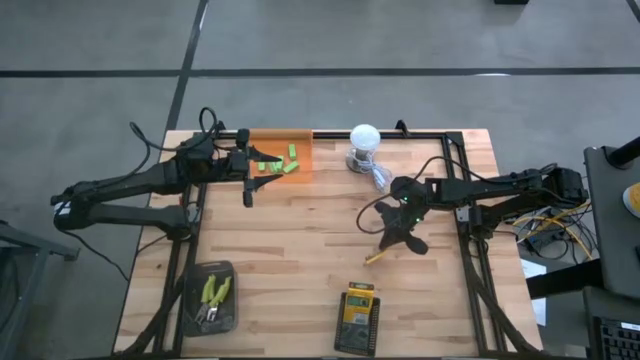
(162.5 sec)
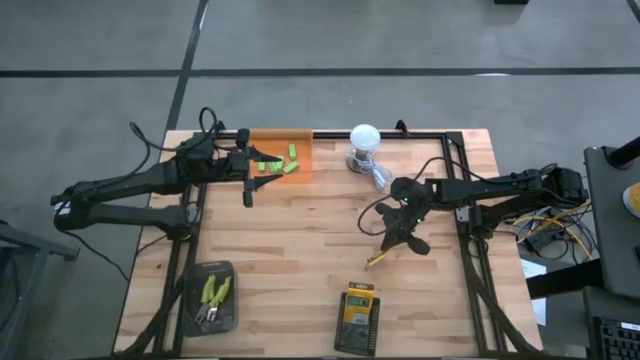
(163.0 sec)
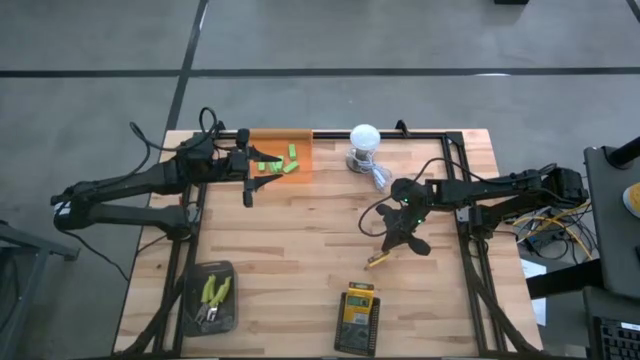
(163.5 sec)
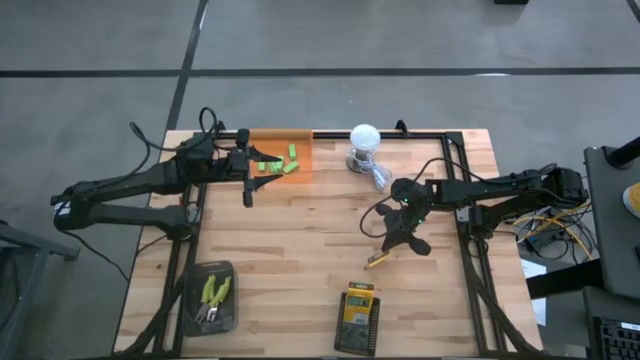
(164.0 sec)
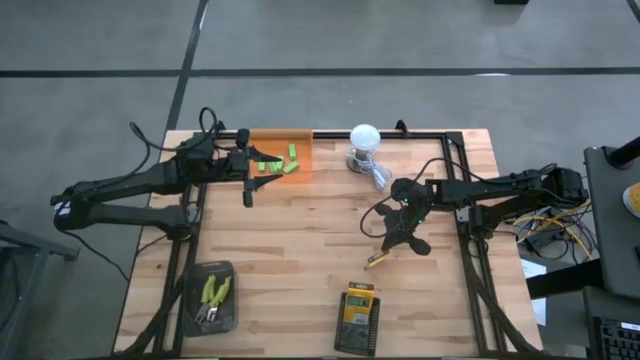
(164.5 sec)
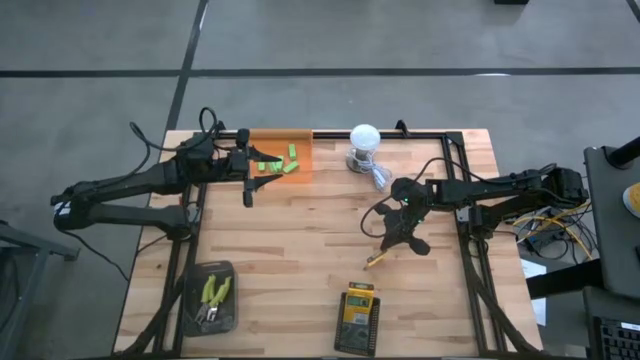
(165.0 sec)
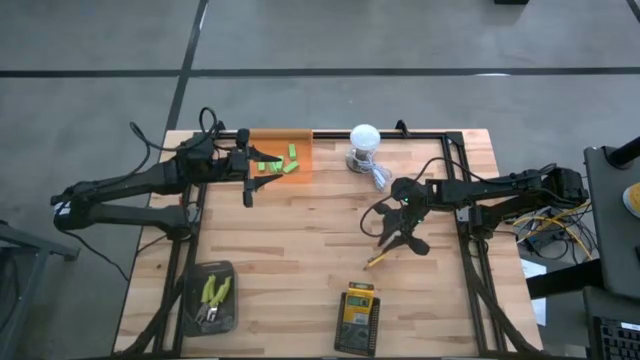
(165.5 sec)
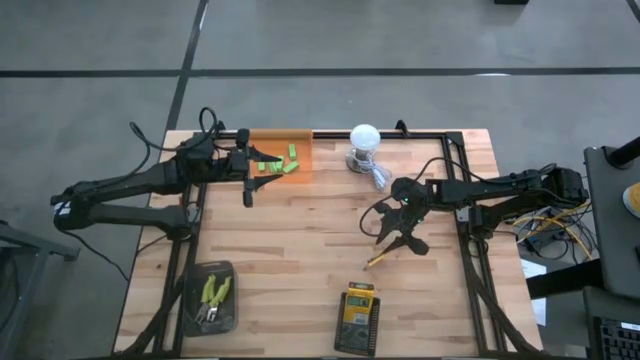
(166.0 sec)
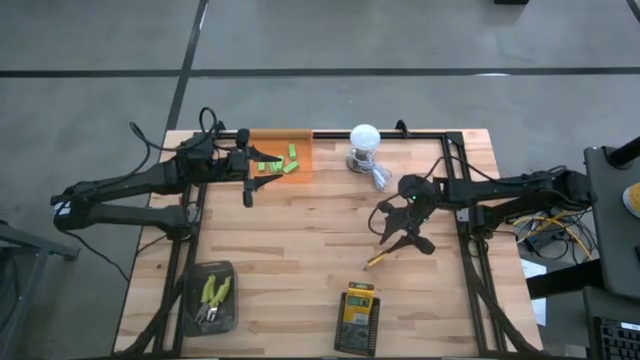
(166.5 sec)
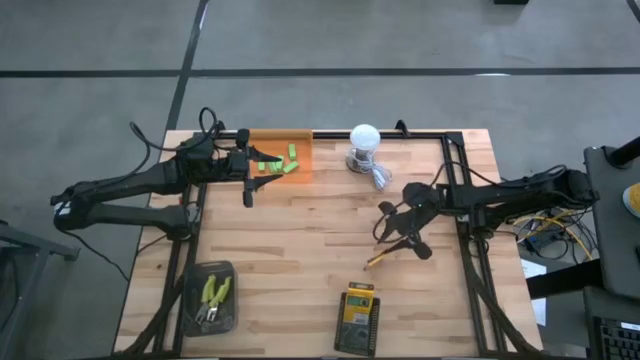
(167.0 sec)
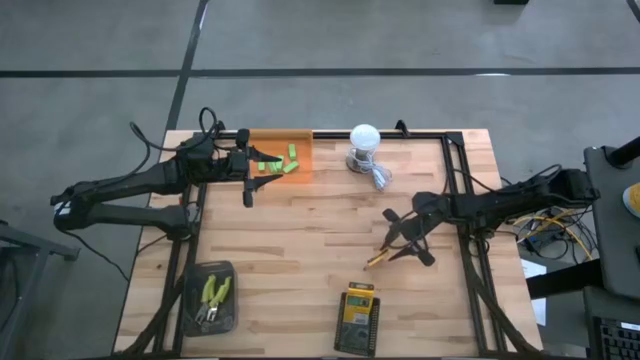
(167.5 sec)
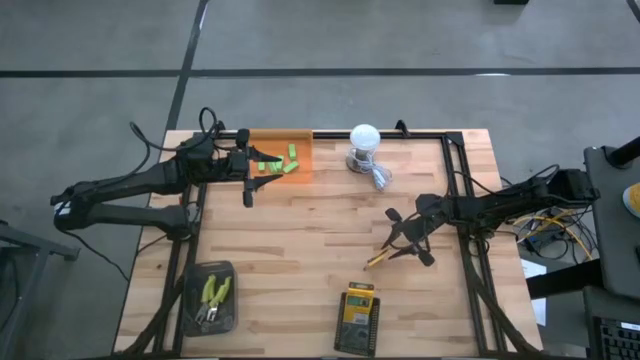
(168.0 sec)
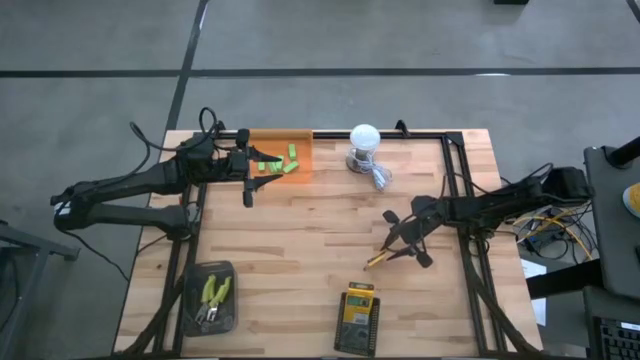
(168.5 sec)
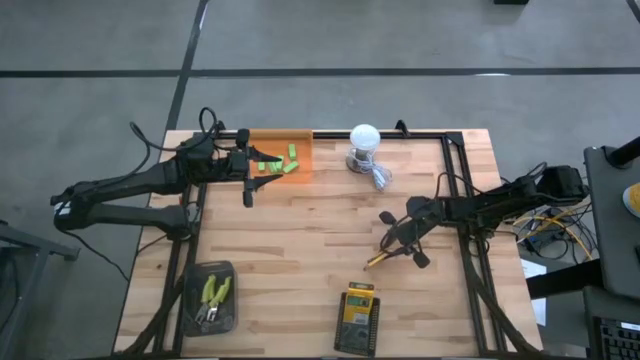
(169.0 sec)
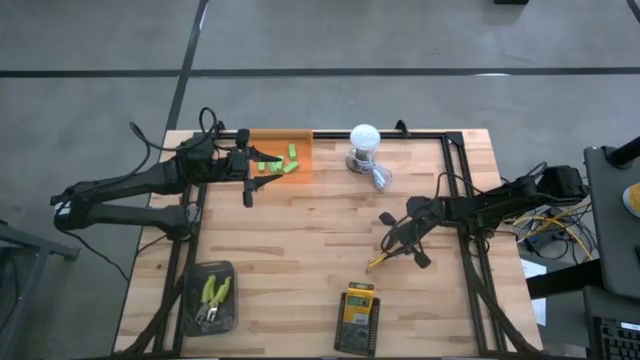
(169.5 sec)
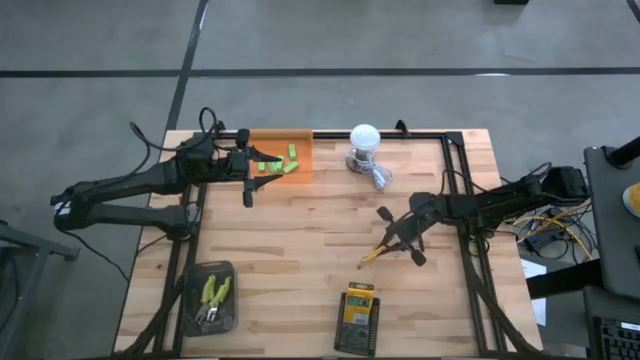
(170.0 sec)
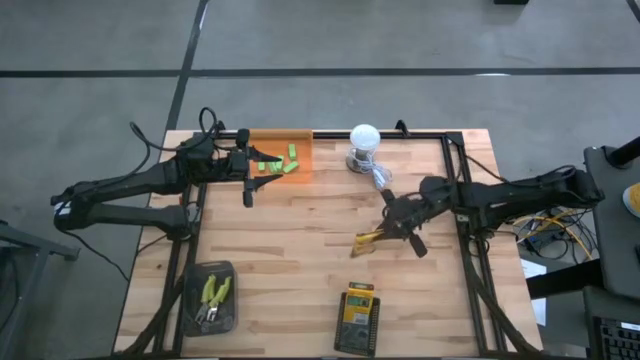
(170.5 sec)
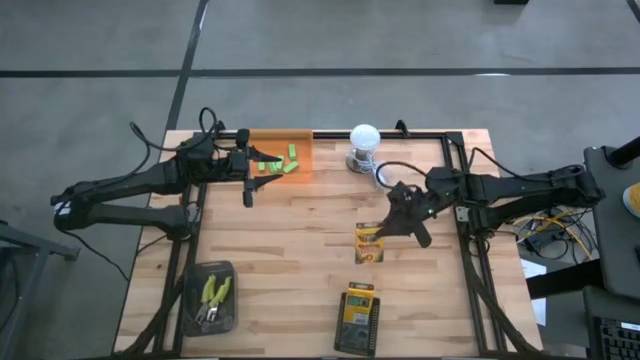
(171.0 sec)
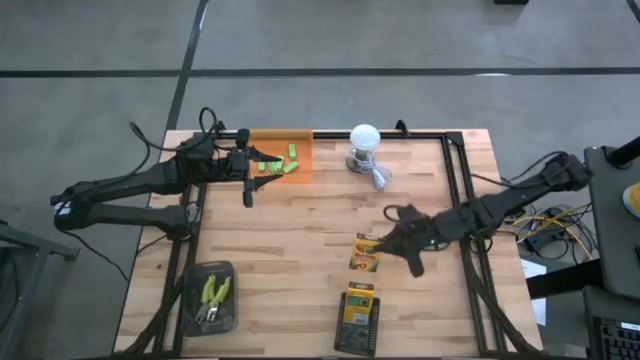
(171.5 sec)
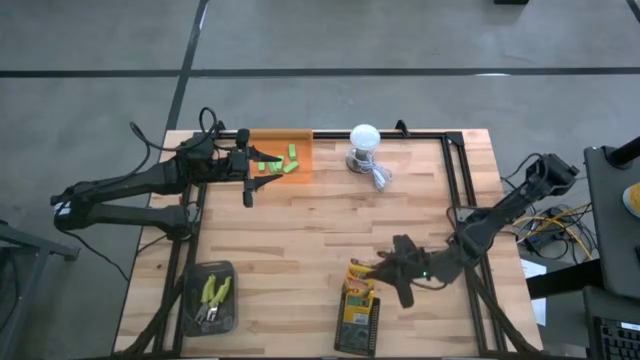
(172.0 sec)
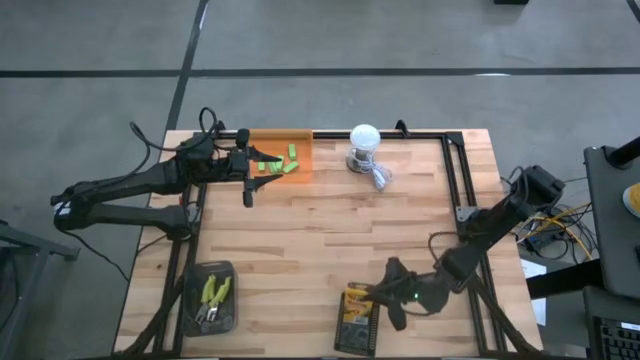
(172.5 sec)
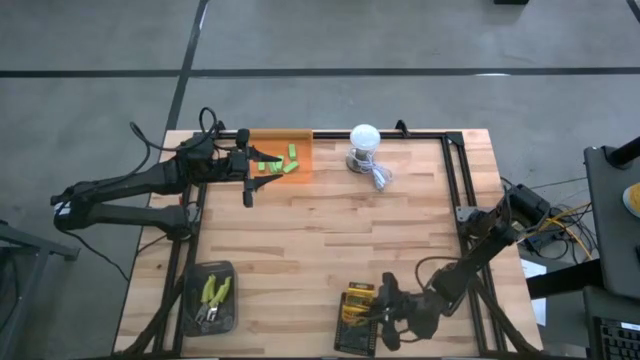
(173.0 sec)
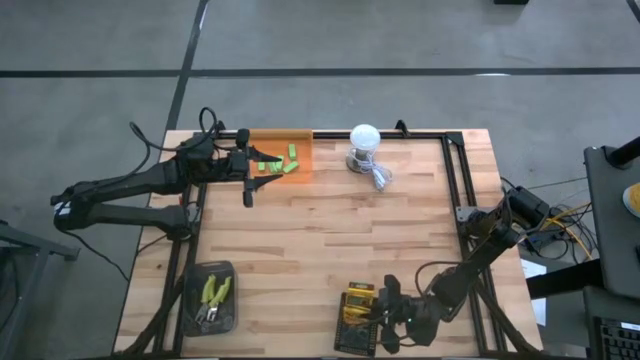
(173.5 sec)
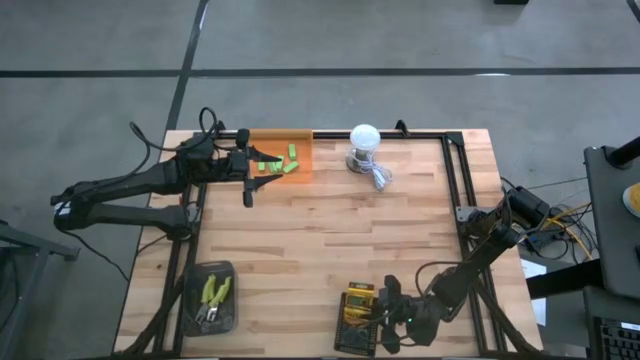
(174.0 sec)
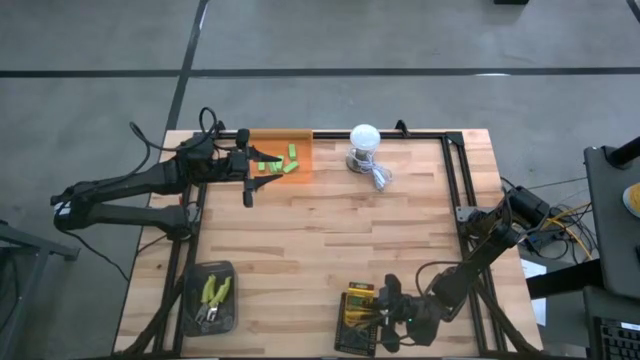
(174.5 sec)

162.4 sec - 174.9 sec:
Task: Pick & Place School Supplies
Put the crayon box into the right black bin

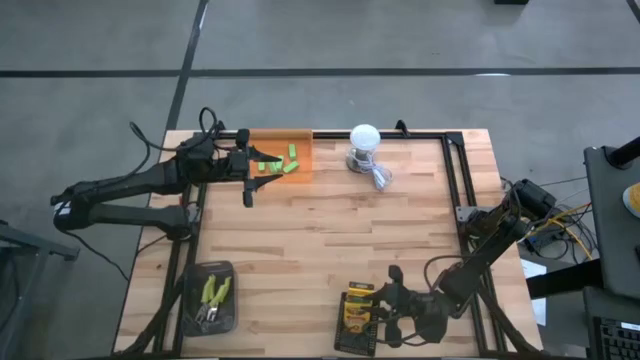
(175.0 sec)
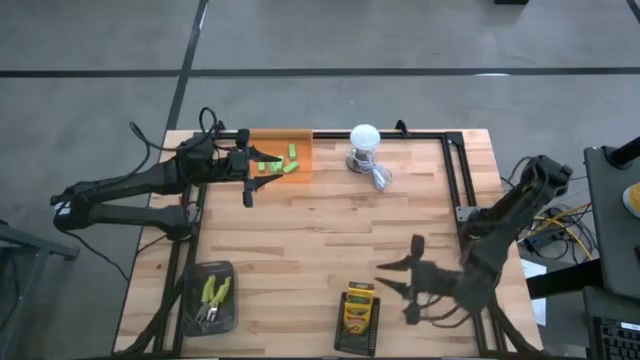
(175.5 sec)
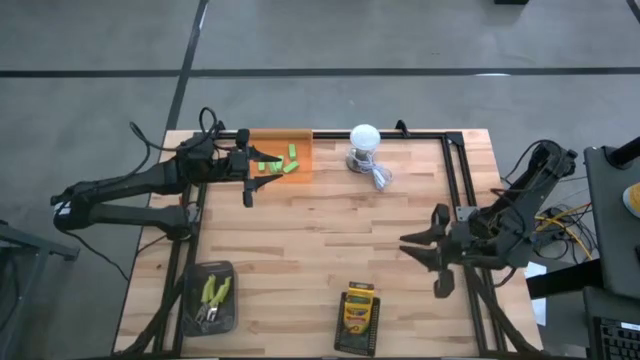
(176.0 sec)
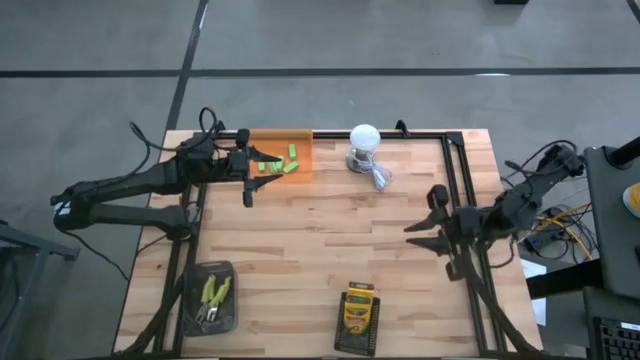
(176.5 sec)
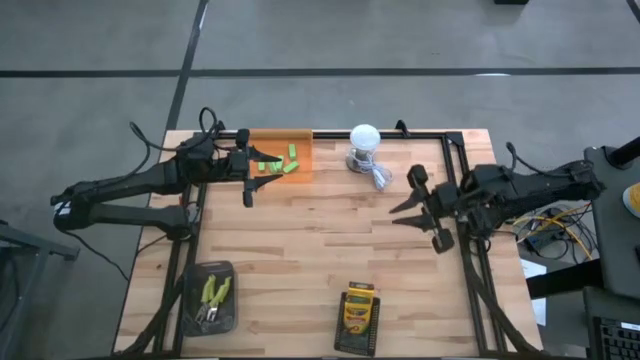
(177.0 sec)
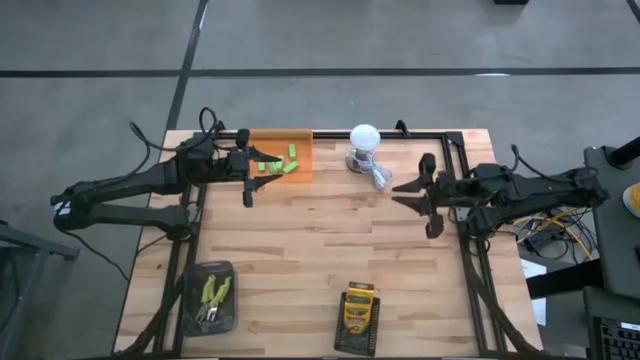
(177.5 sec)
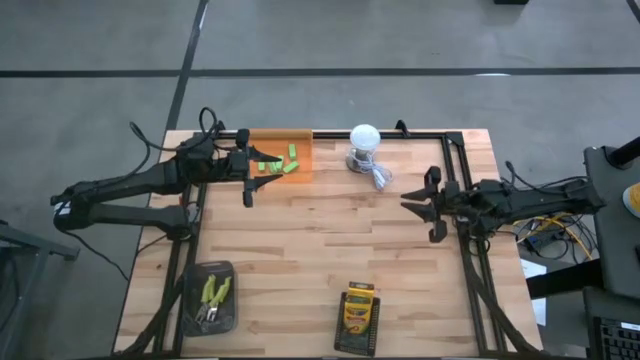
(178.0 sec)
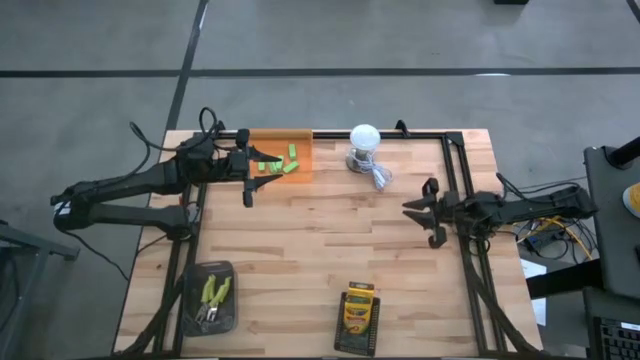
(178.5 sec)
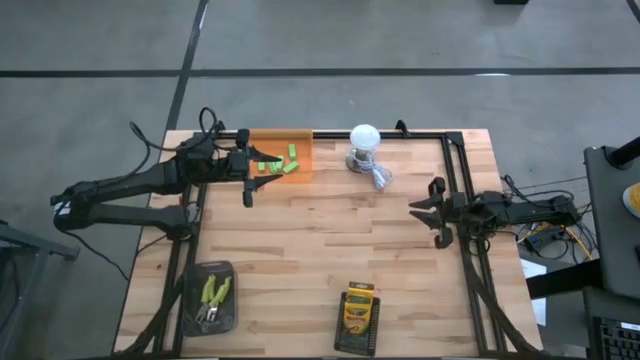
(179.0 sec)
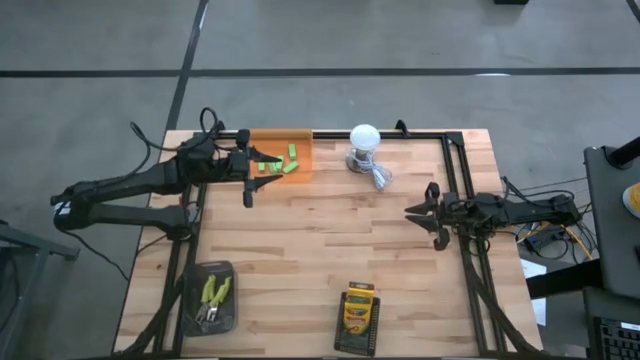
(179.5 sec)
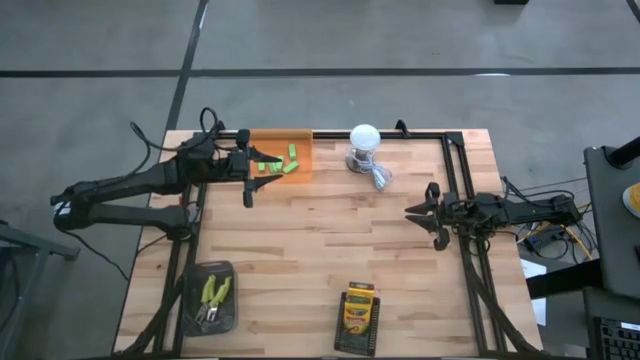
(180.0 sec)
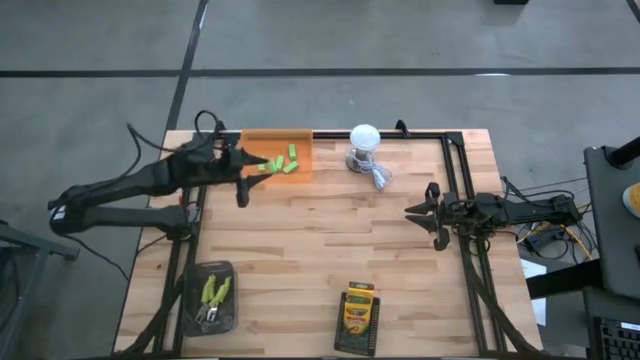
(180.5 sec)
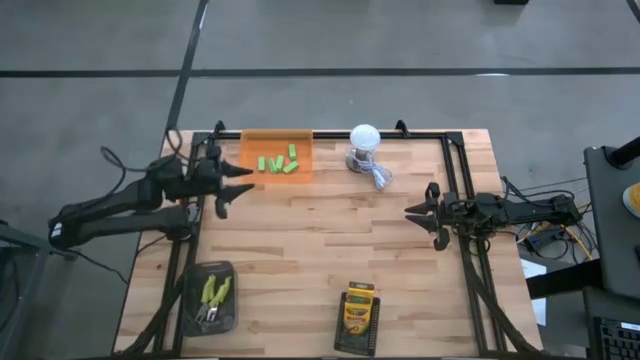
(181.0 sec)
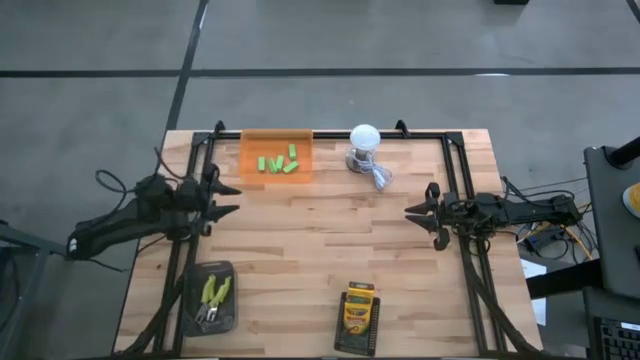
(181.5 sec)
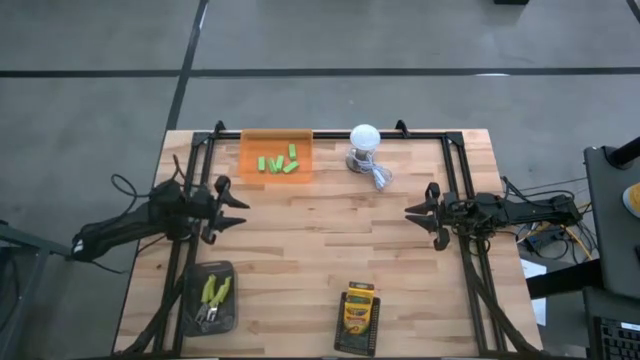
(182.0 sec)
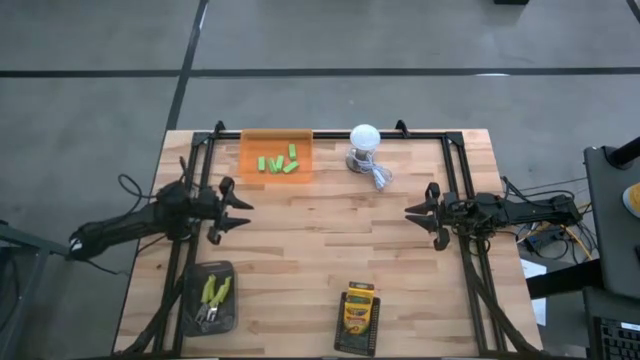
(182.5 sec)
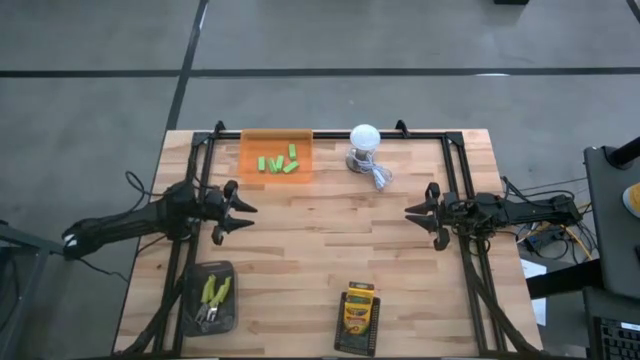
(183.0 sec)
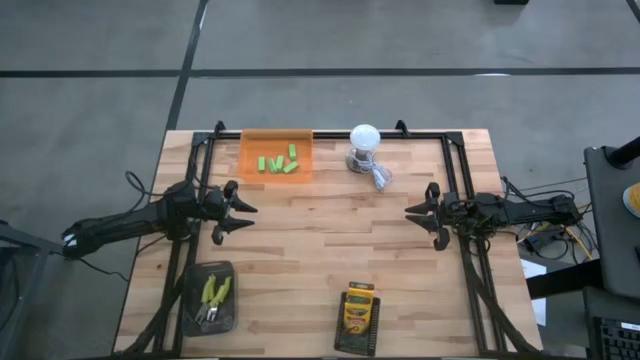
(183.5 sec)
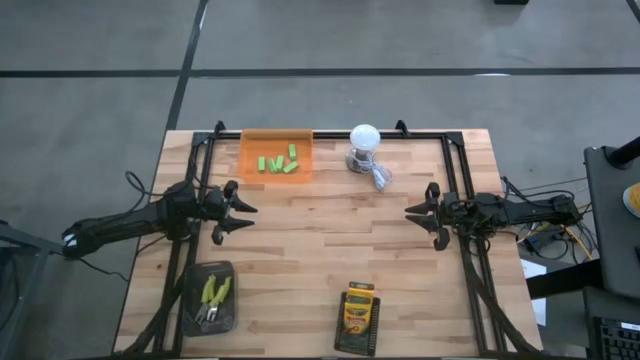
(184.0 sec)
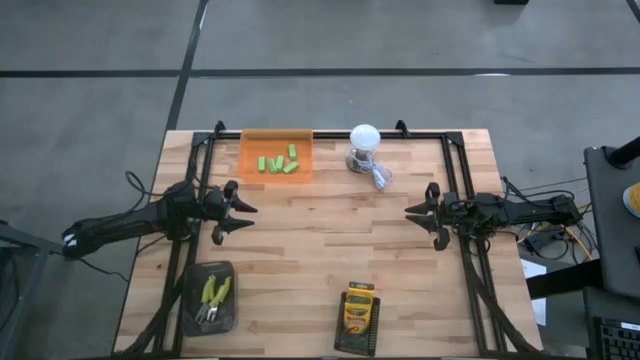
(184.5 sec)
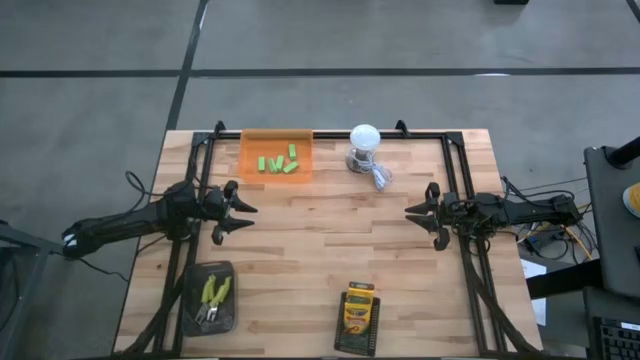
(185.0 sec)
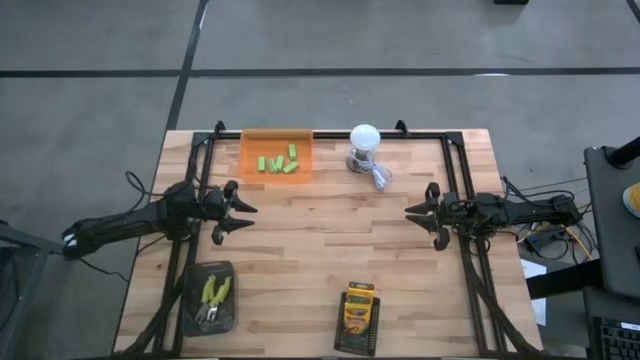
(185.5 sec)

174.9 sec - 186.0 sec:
Return to Home Position
